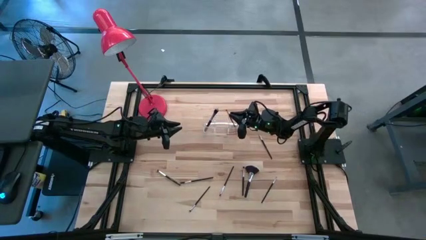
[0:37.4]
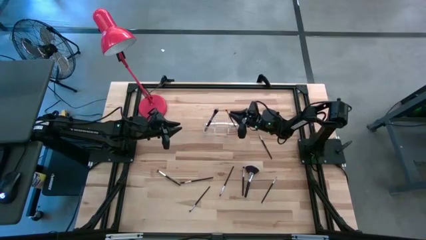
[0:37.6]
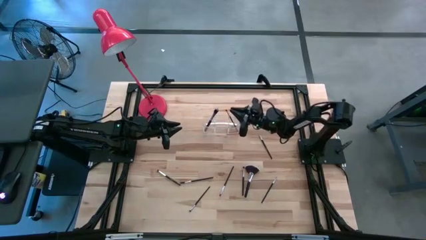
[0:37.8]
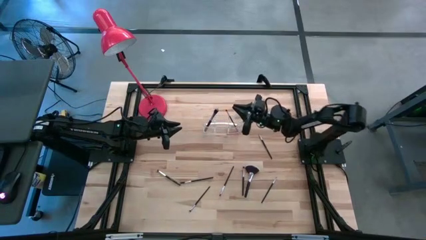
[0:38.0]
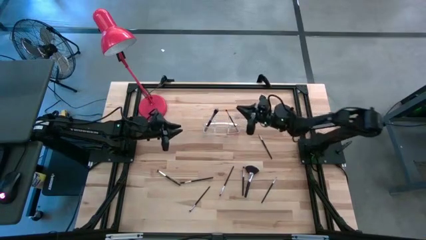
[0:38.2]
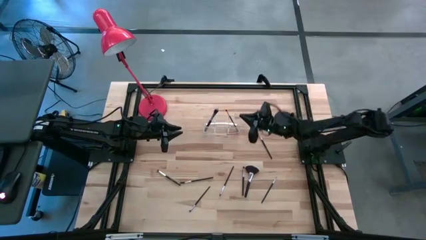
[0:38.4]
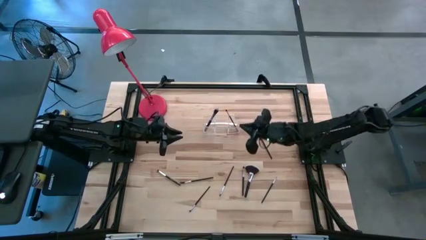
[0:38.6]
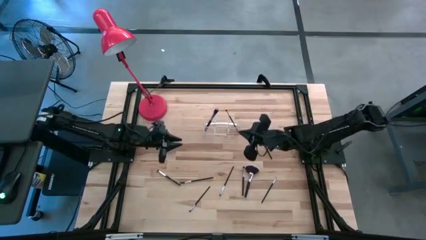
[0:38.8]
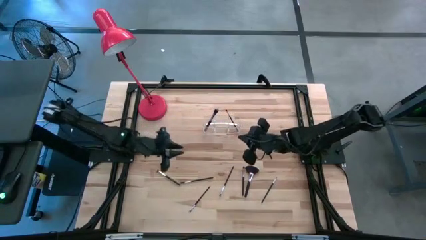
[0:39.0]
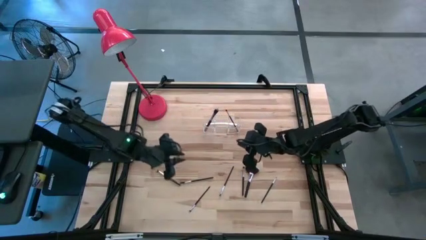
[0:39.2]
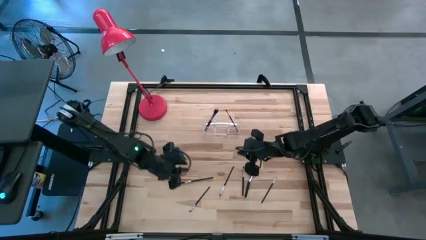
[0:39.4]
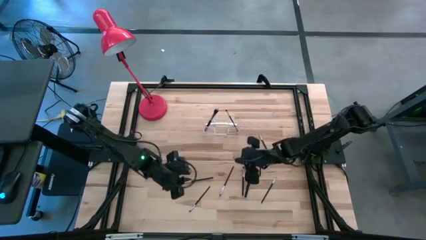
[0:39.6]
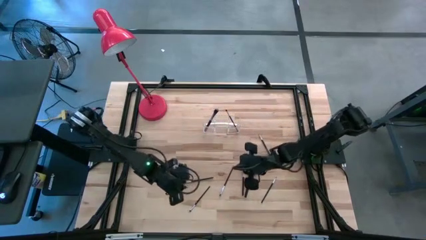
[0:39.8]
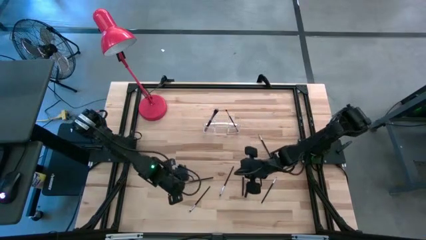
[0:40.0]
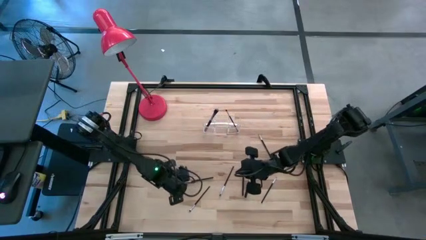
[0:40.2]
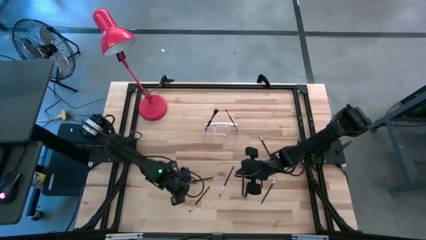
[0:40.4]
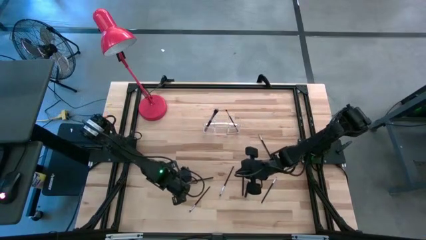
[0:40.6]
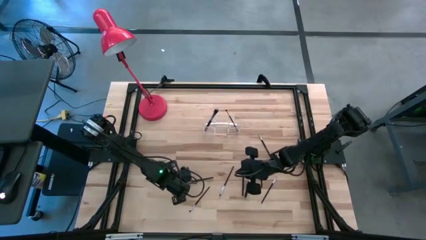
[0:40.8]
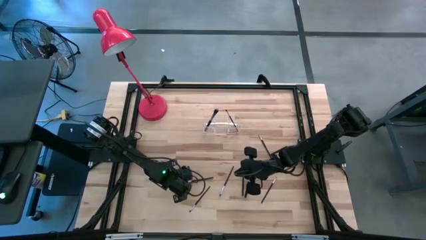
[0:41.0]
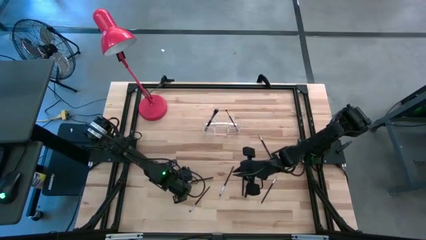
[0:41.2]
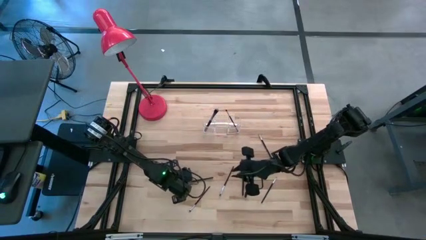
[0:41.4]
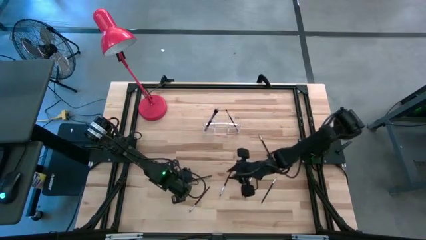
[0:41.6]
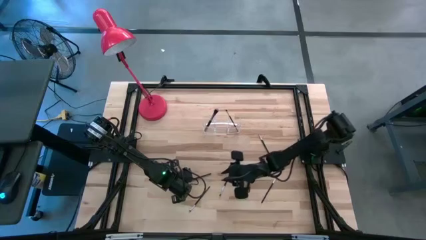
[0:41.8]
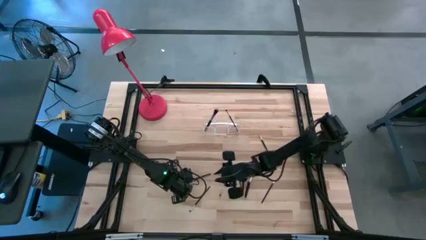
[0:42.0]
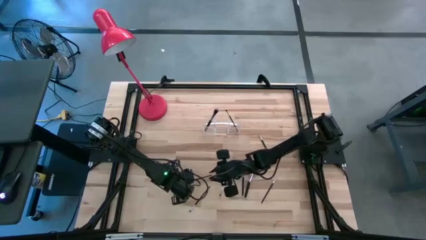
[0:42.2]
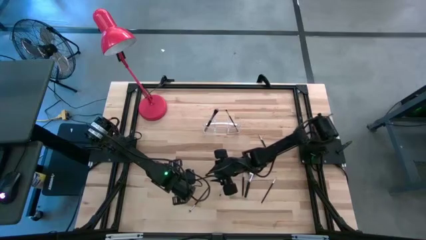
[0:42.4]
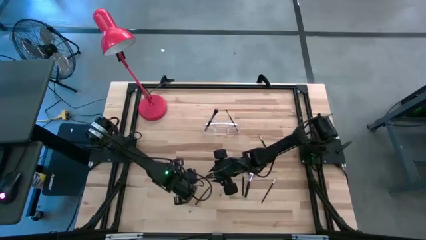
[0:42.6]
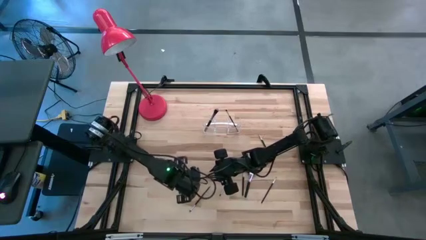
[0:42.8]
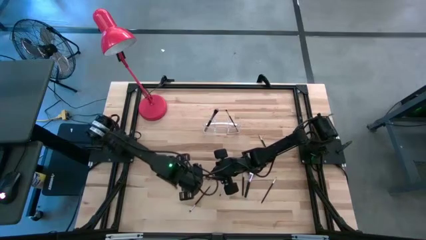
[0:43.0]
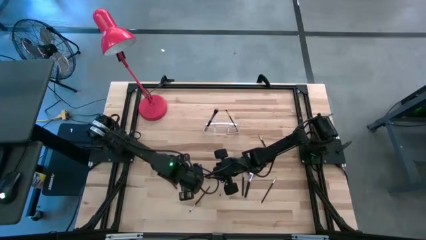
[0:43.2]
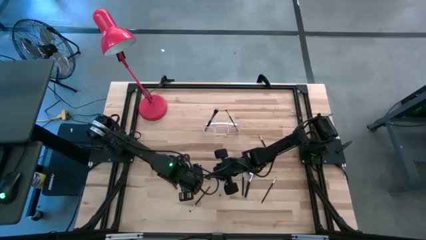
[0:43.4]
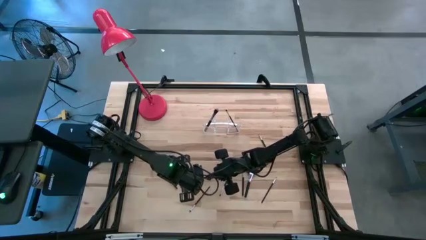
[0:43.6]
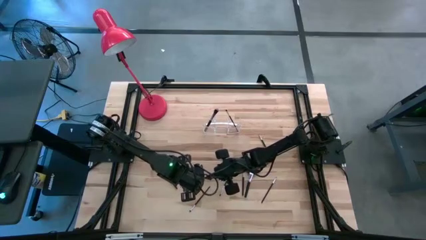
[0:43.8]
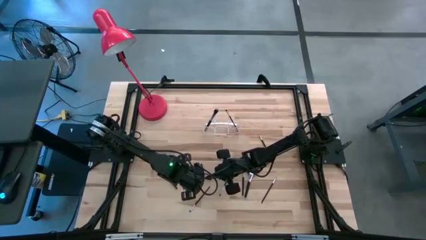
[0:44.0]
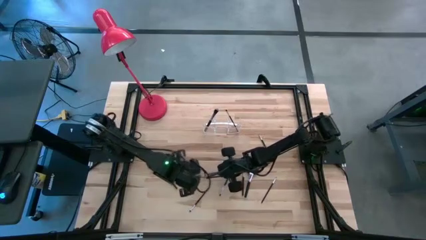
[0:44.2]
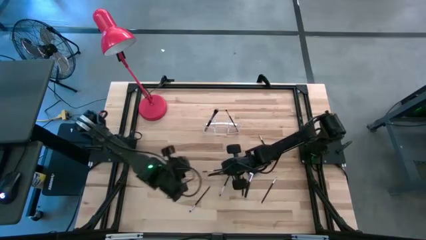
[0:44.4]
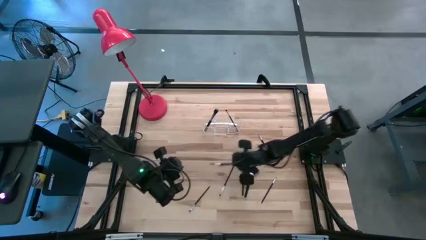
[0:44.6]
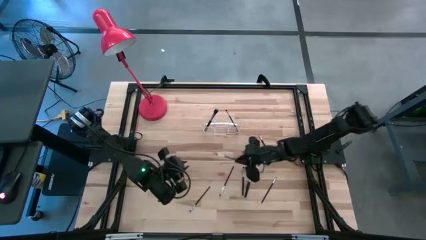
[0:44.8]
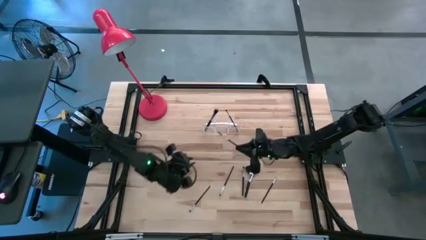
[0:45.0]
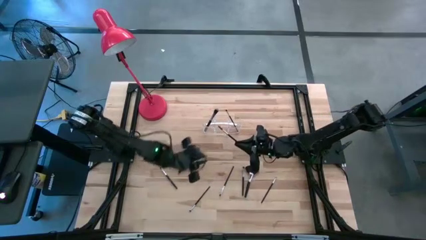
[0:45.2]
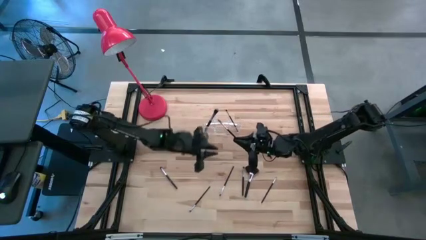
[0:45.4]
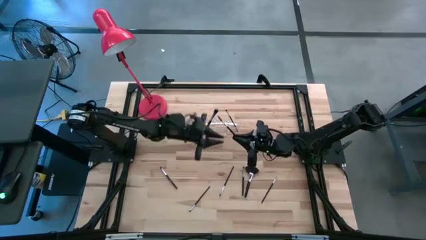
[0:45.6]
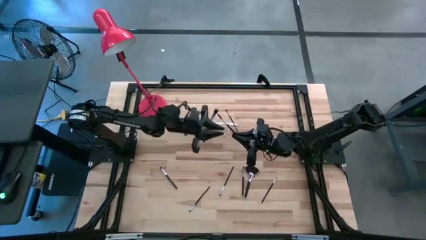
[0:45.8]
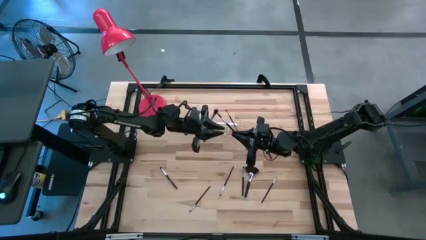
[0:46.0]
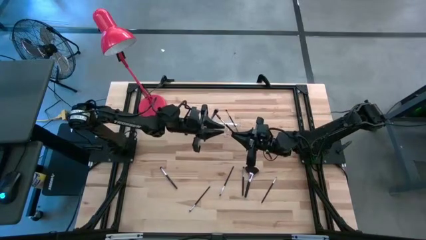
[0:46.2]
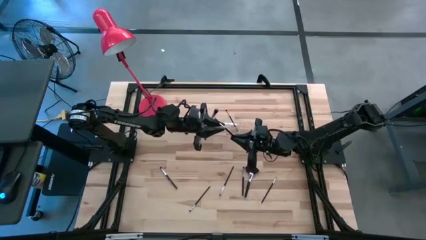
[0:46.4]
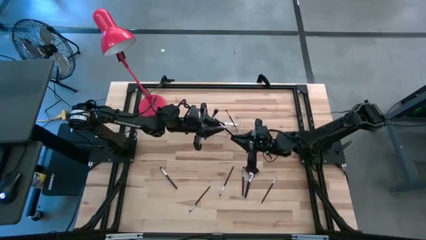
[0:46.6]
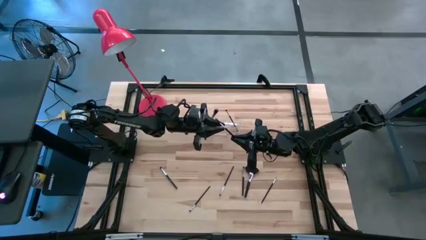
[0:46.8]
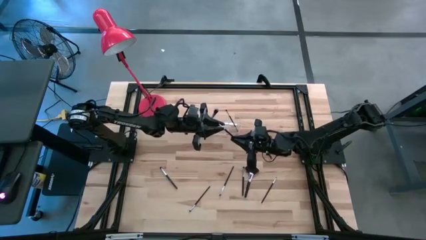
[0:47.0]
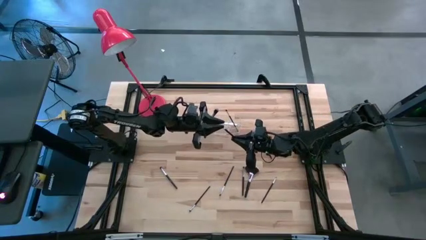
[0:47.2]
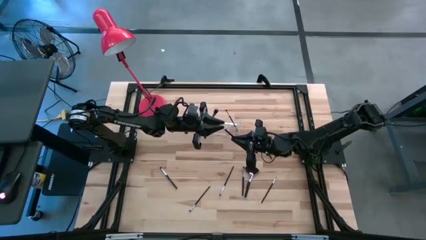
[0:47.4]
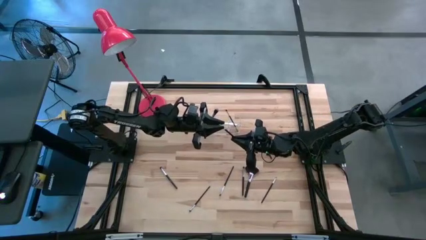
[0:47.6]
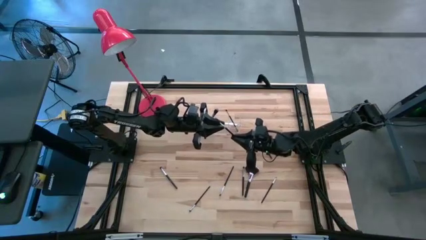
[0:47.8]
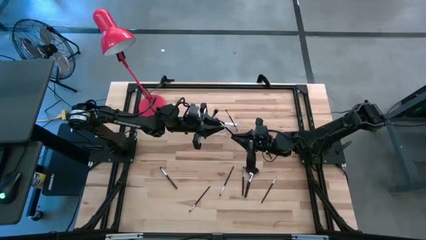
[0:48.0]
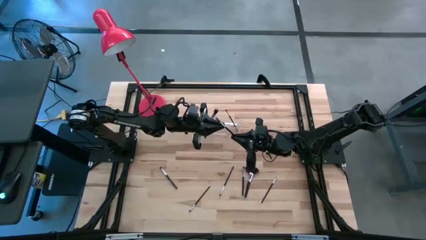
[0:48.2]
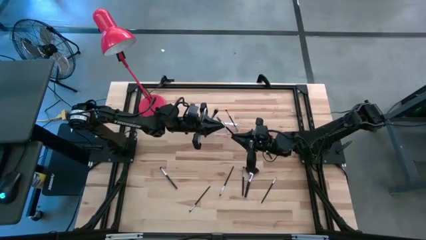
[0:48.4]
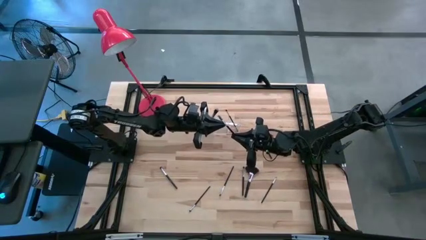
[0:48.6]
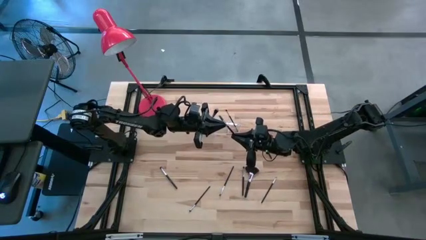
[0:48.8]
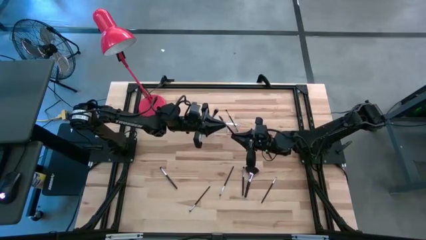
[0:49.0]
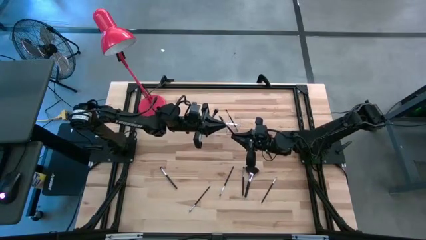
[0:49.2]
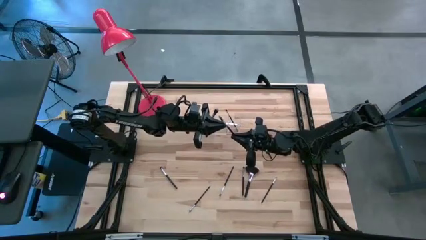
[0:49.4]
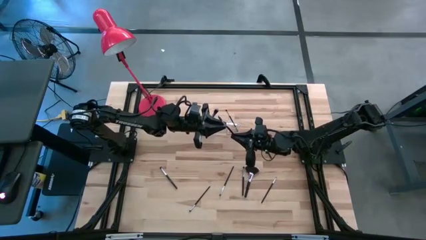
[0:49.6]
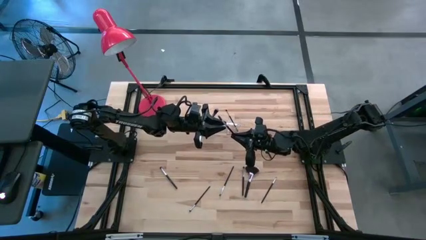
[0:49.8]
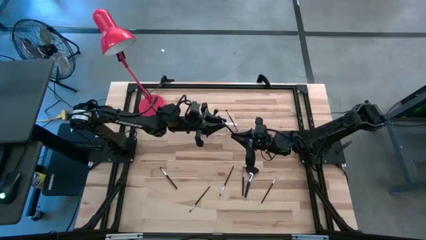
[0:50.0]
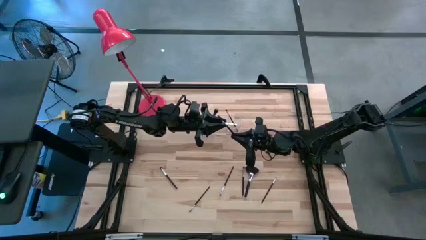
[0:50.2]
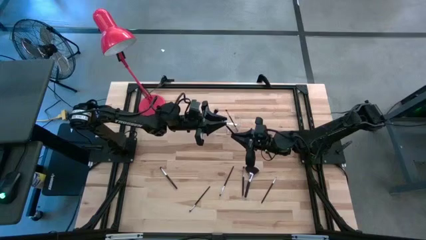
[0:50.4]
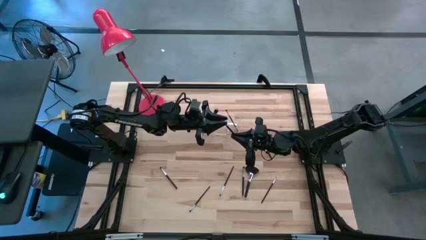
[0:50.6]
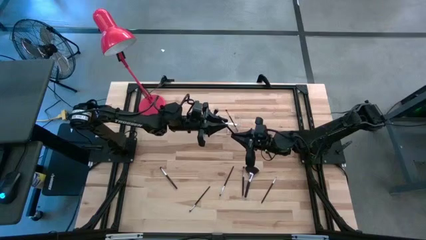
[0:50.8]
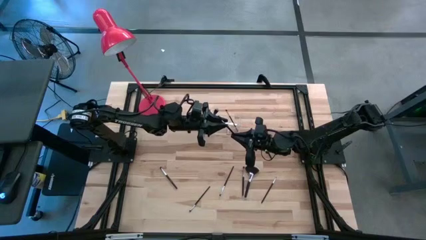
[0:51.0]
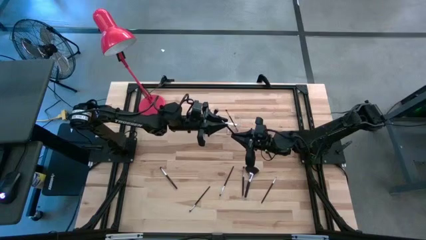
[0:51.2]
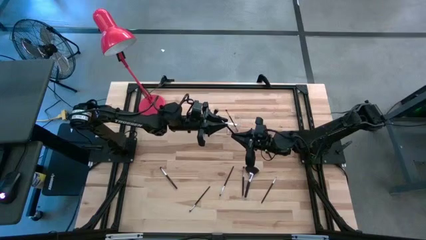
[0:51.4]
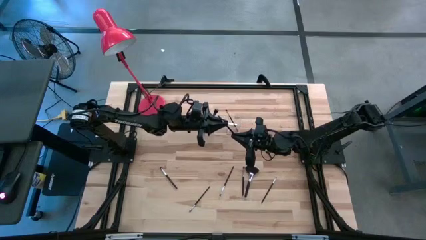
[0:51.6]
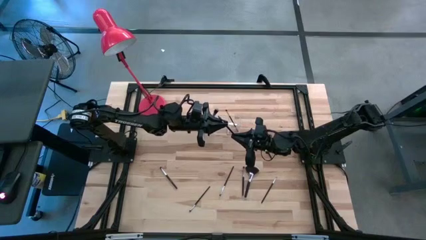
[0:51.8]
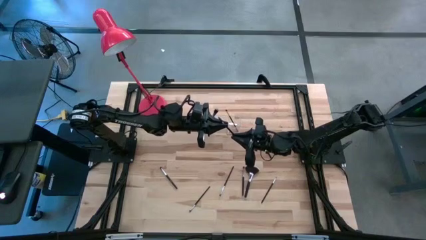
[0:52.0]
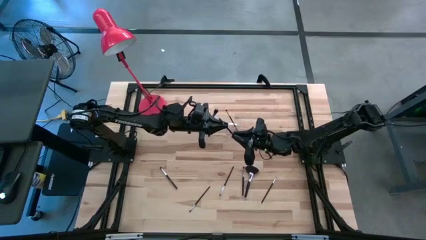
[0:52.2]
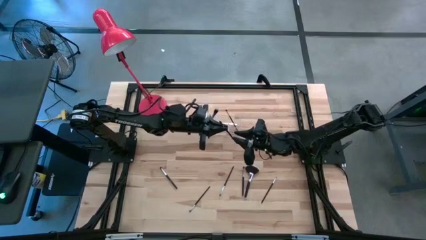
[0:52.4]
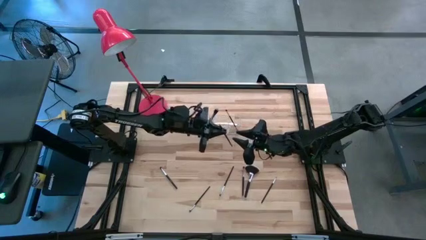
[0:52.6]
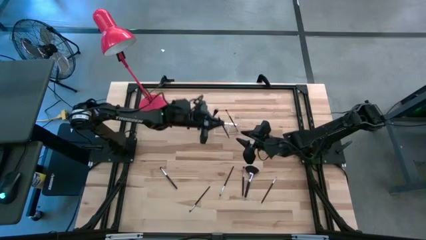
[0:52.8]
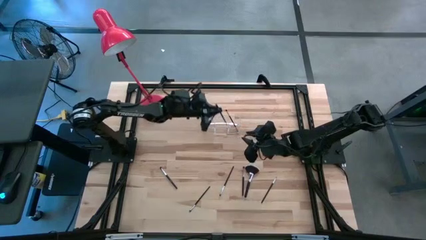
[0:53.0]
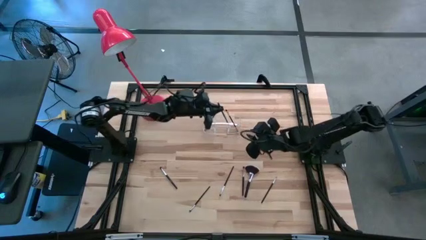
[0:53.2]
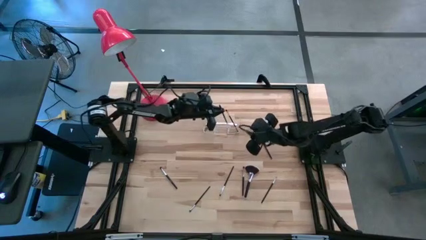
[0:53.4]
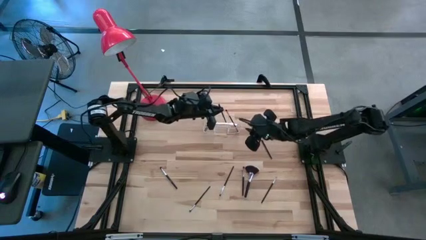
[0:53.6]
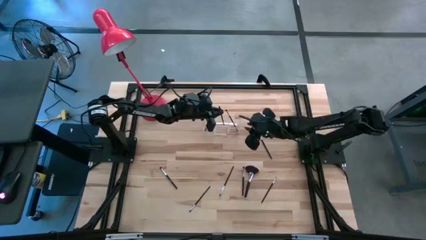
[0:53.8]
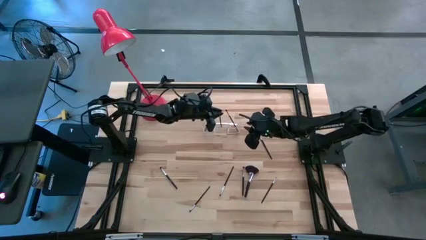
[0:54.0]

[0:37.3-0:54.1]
Task: Pick & Place Makeup Supplies
Put the makeup brush into the transparent organizer
